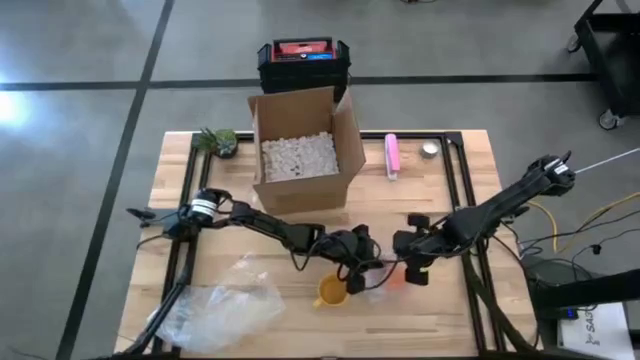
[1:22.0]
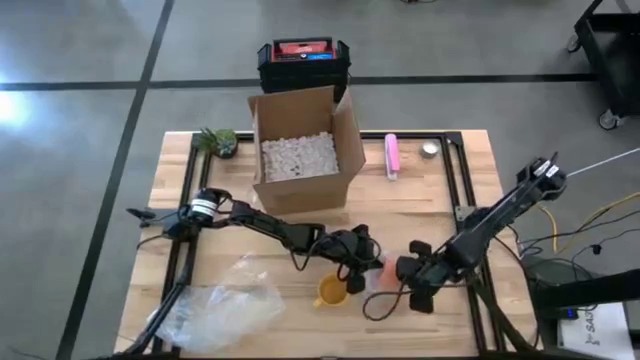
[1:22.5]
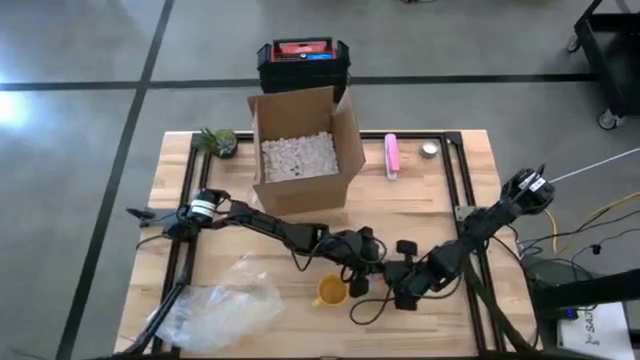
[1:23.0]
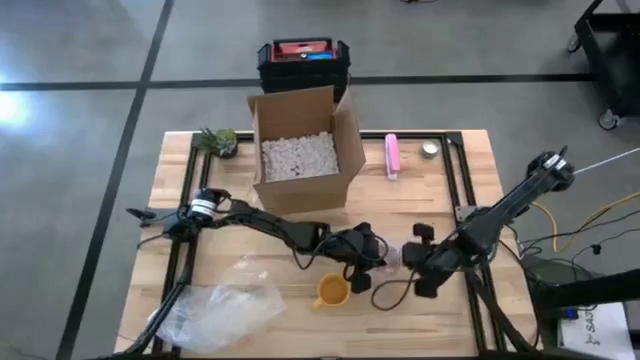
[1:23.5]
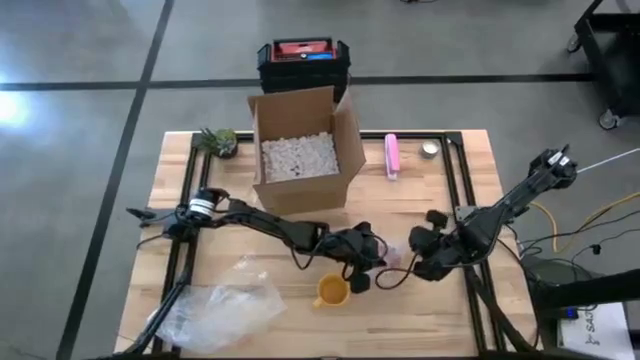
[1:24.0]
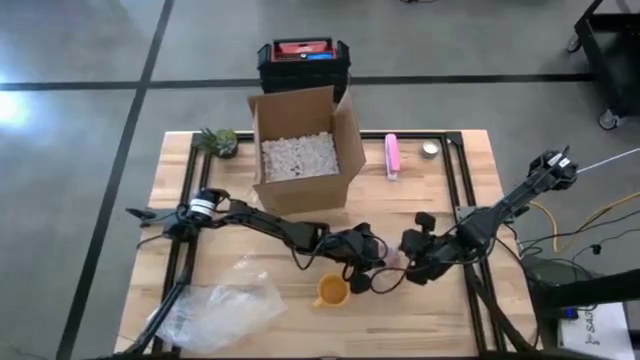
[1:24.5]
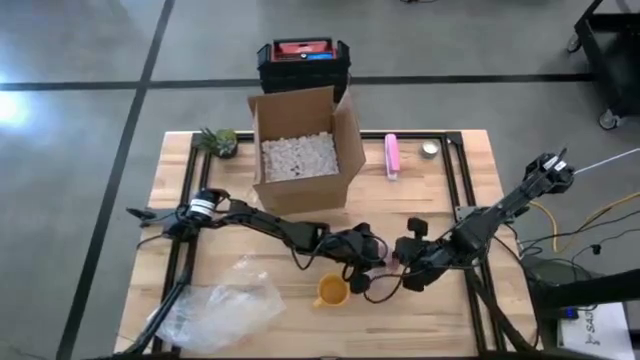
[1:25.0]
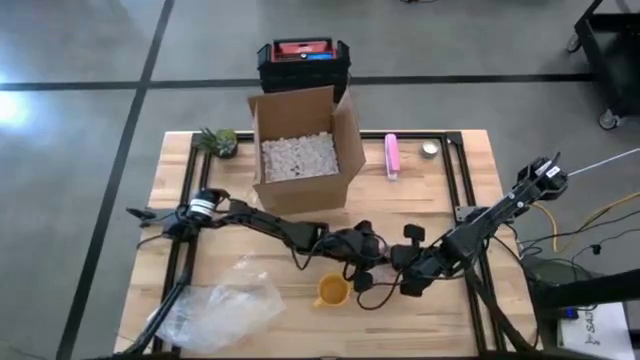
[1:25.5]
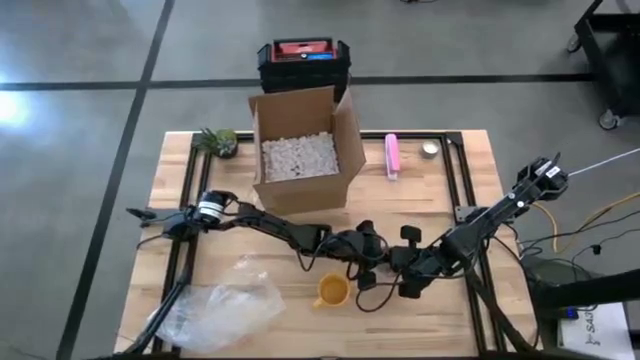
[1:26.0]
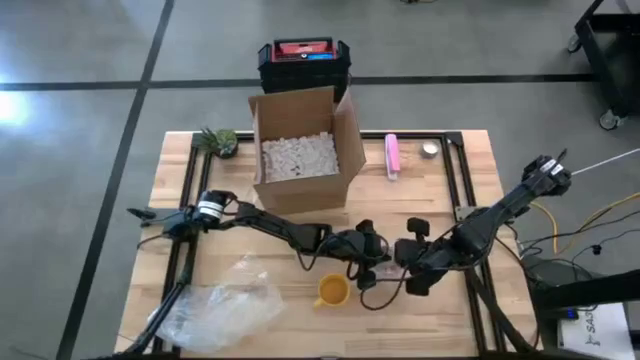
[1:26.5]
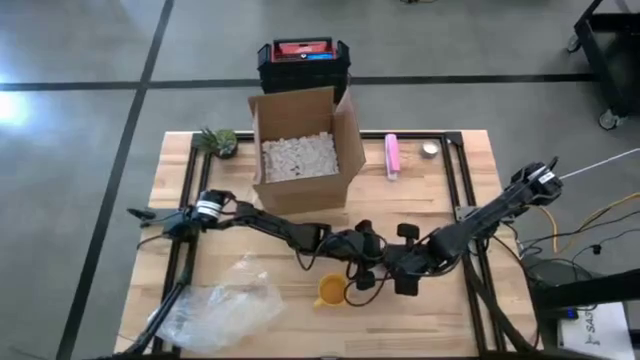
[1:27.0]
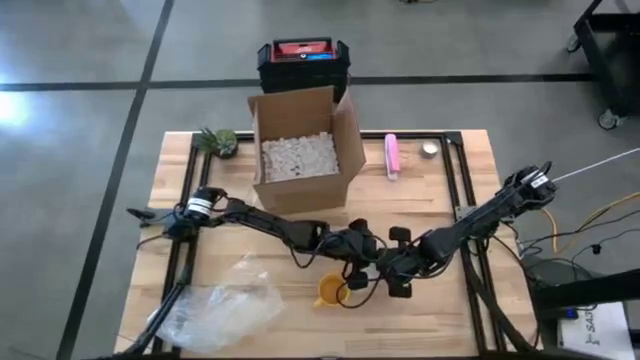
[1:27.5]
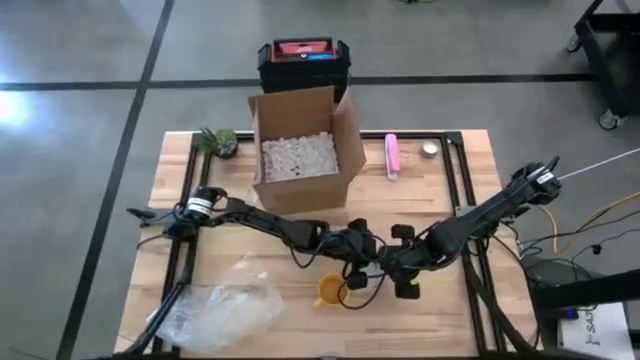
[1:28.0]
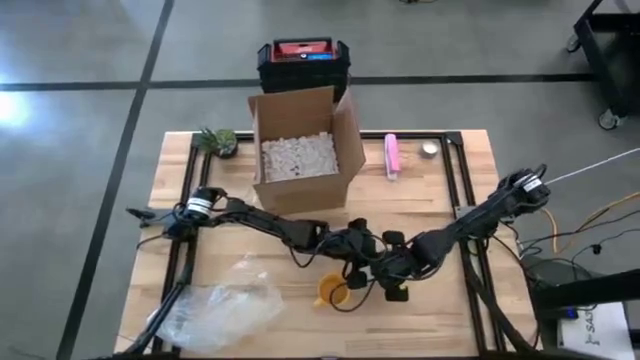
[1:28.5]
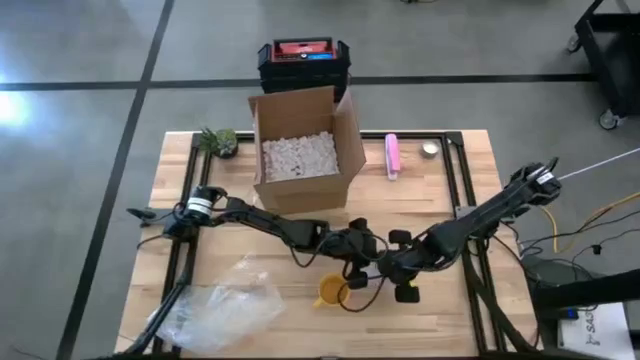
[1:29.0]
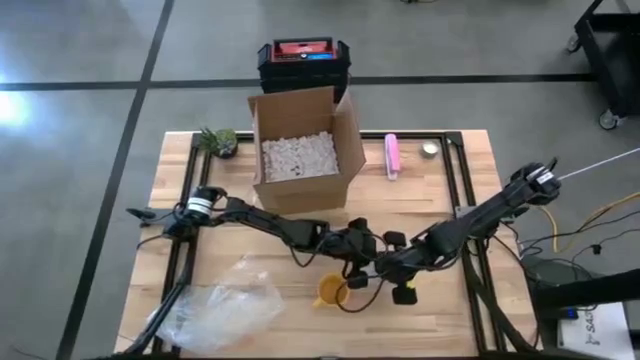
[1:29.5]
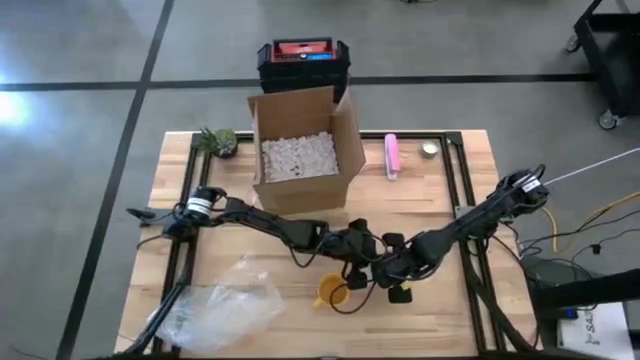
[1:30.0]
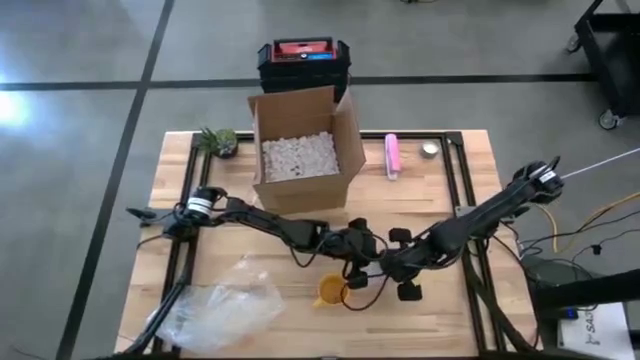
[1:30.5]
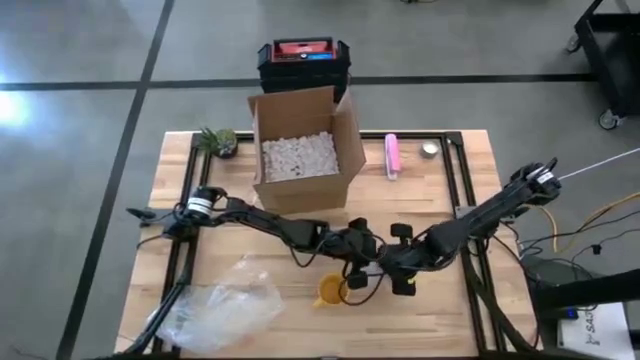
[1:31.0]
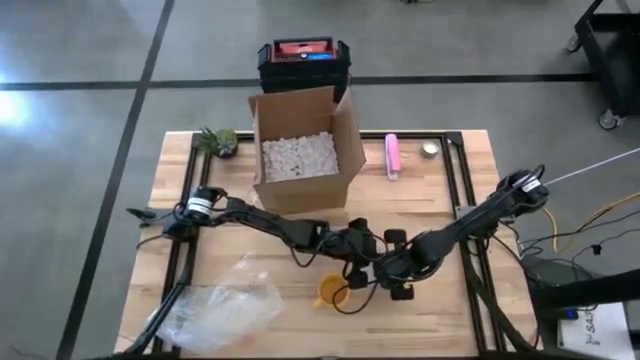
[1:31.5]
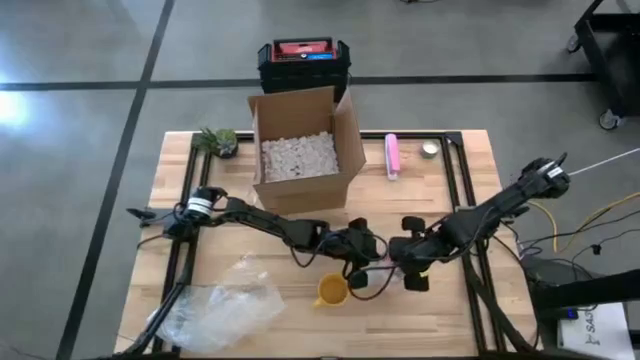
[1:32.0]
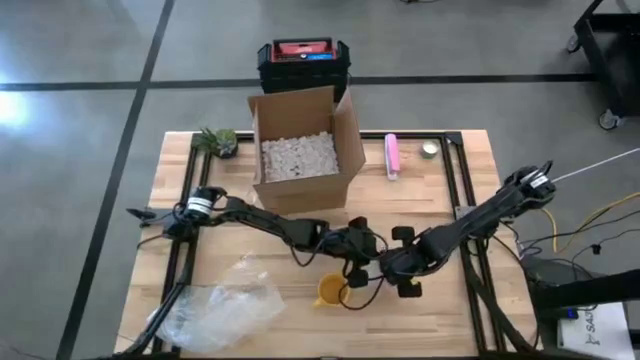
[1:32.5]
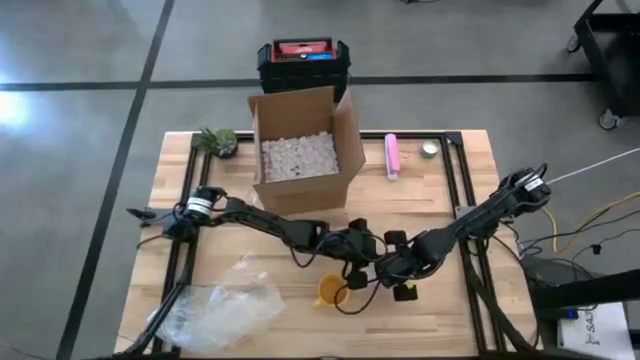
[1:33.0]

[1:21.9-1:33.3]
Task: wrap mug
Wrap the orange mug in the right transparent bubble wrap

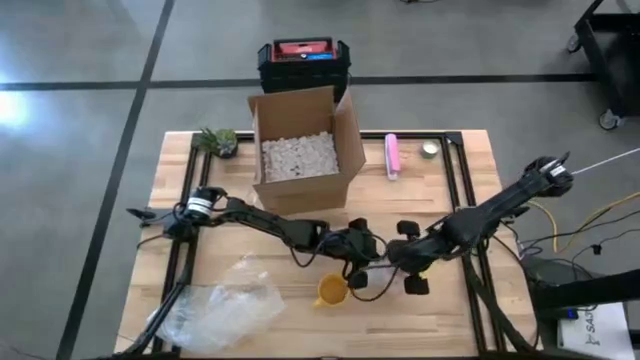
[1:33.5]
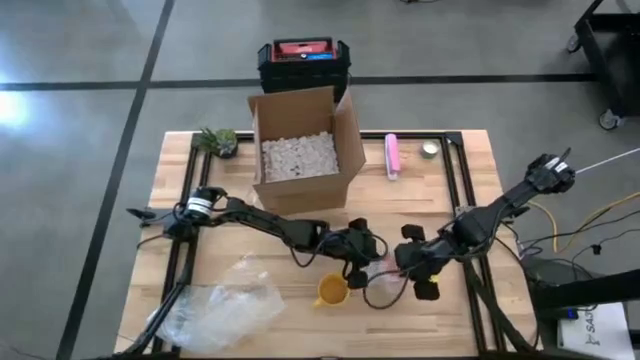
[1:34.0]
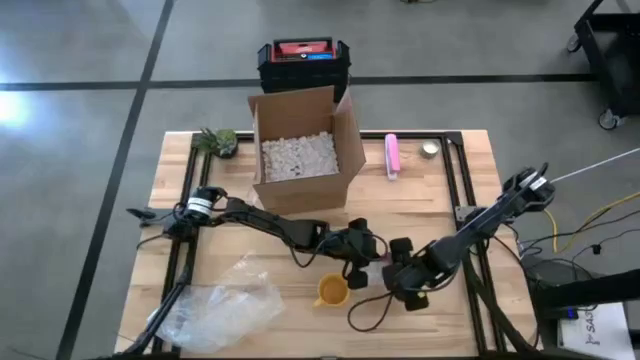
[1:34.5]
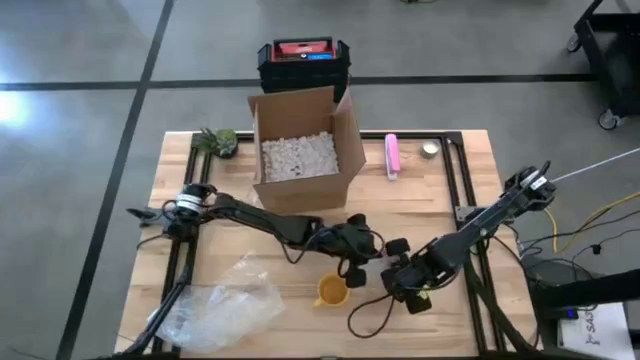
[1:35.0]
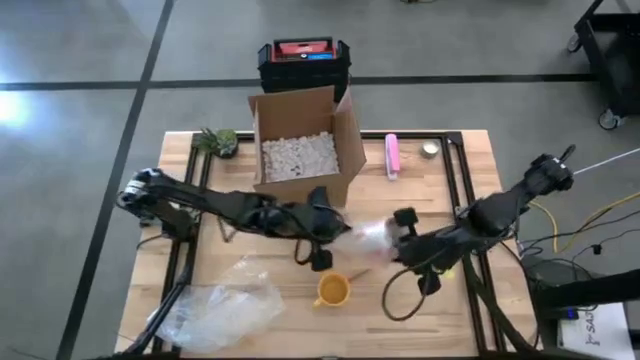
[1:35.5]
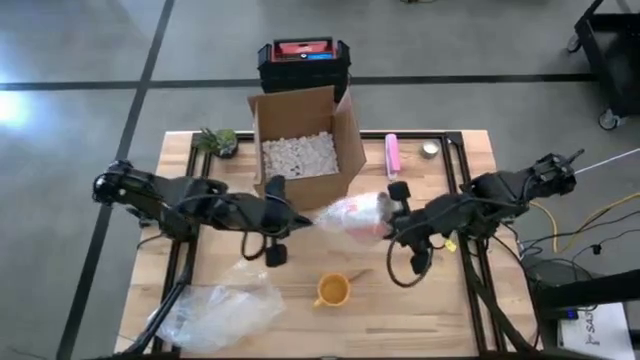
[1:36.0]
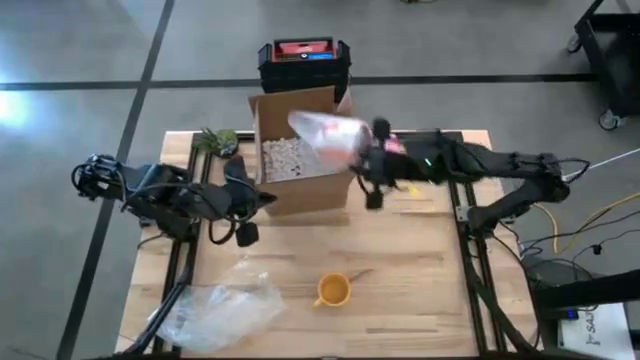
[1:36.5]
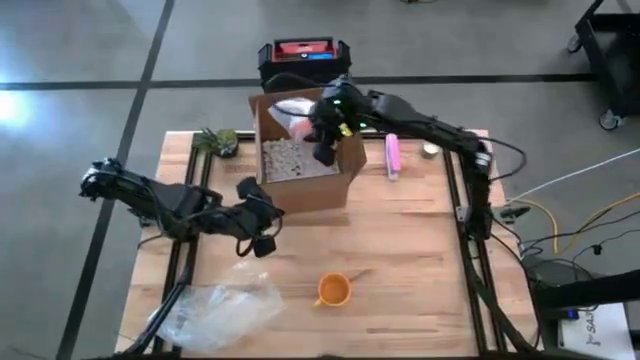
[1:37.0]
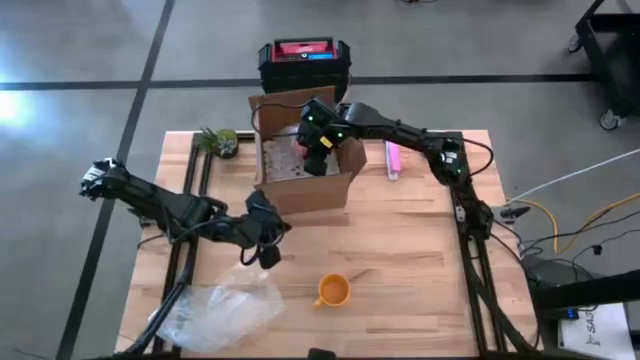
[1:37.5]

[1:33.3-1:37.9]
Put the wrapped orange mug into the cardboard box

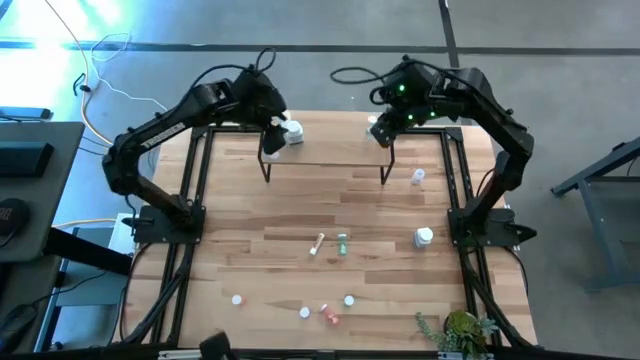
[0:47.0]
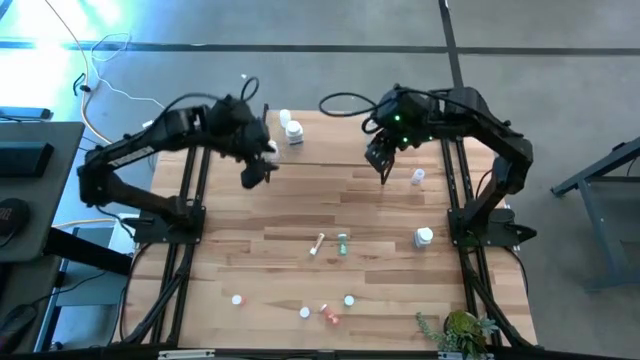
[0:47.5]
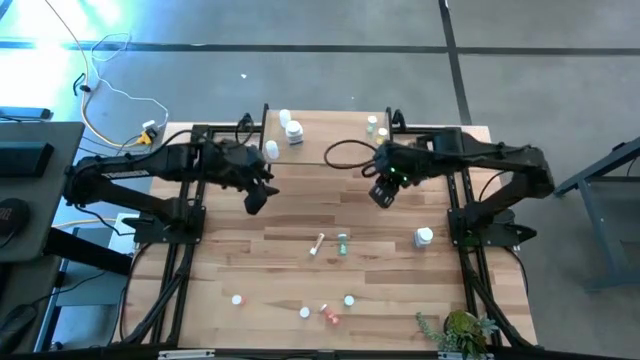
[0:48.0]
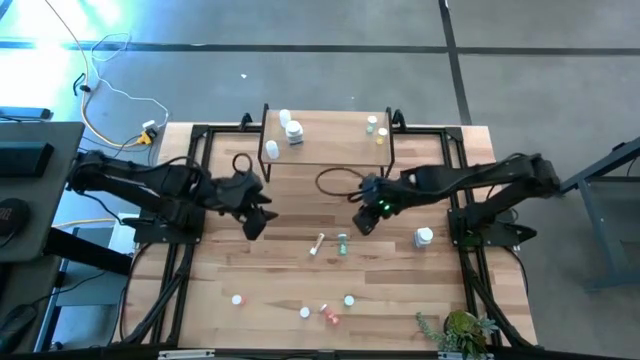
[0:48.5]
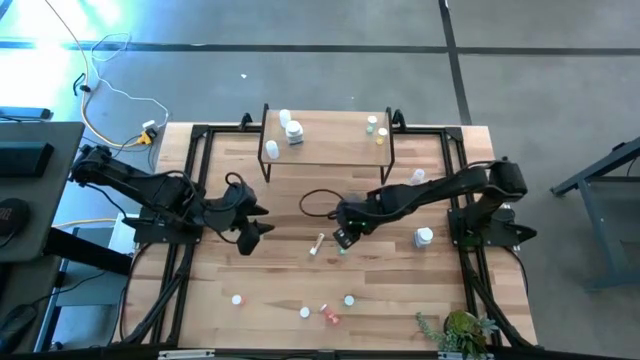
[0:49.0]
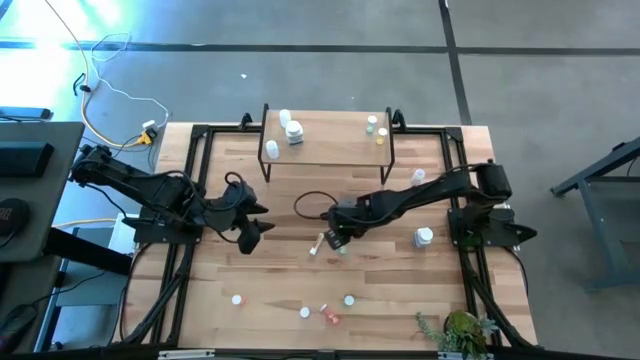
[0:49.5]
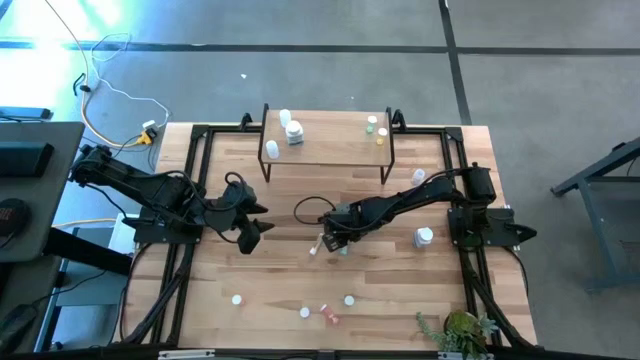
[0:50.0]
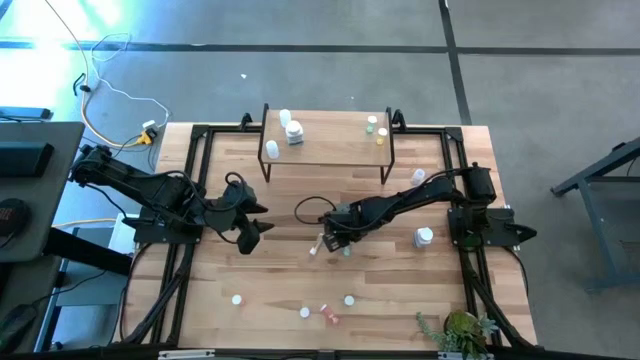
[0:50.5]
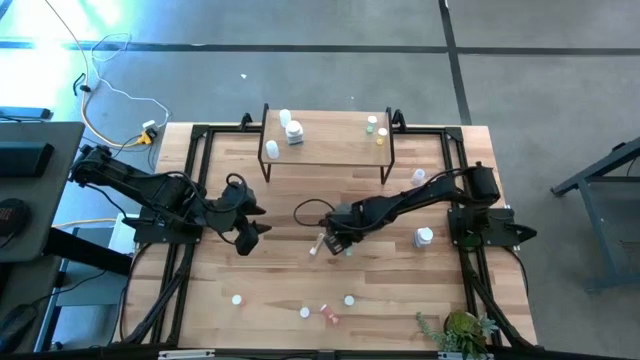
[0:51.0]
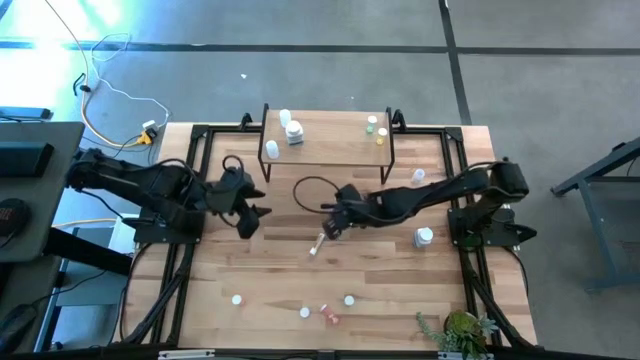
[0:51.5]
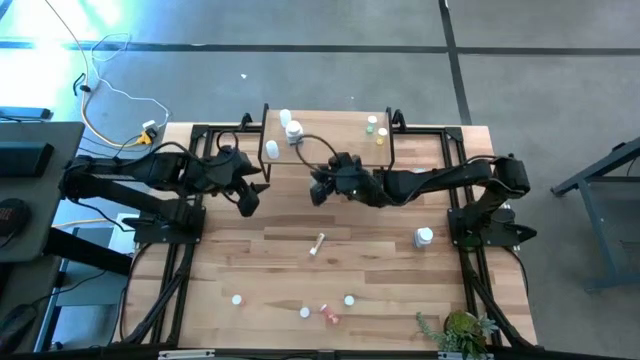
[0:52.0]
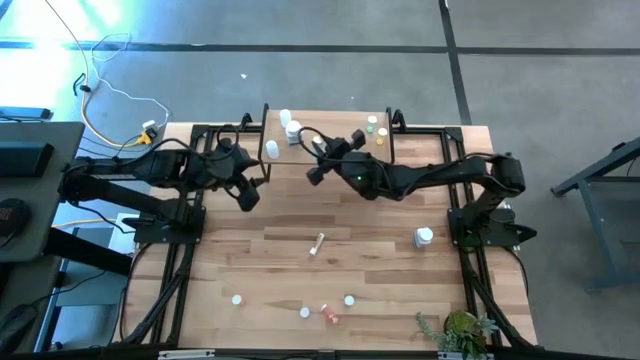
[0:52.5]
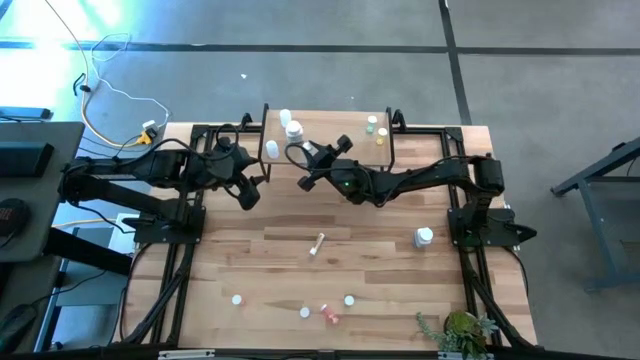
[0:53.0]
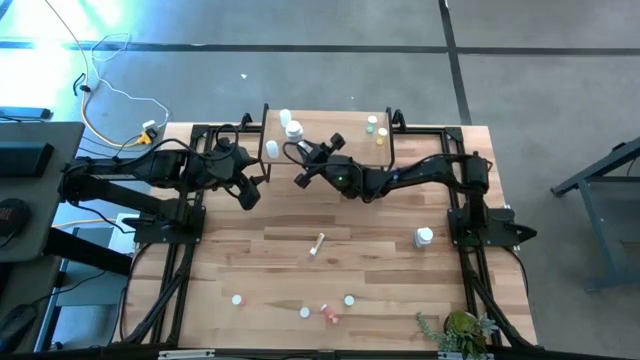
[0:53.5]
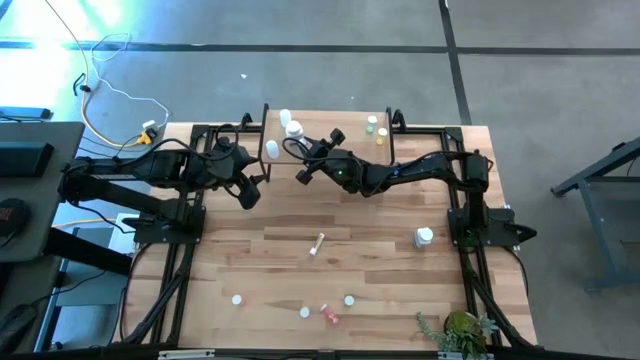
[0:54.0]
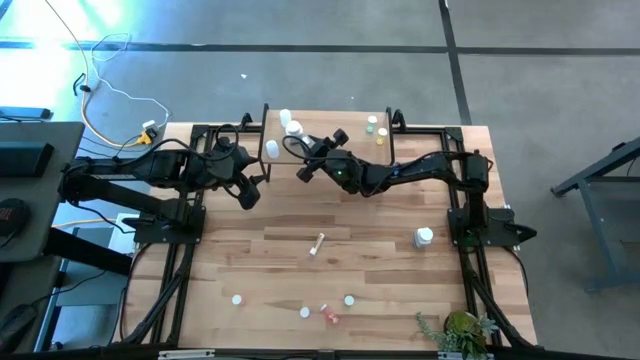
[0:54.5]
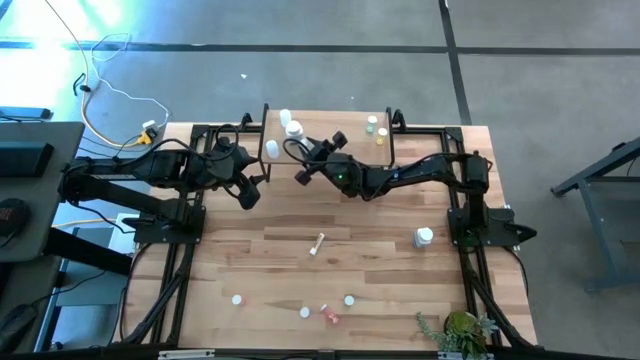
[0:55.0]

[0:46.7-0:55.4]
Task: Pick and place medicine bottles onto shelf by color
Put the top blue pill bottle on the shelf
